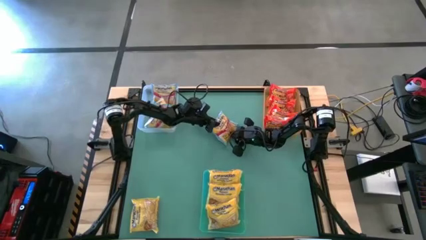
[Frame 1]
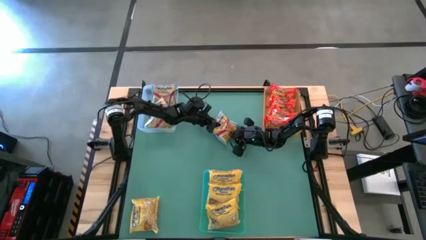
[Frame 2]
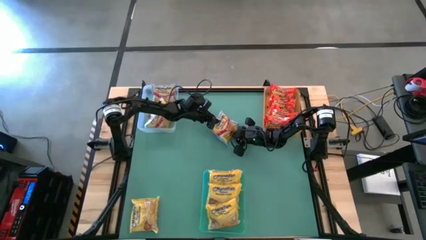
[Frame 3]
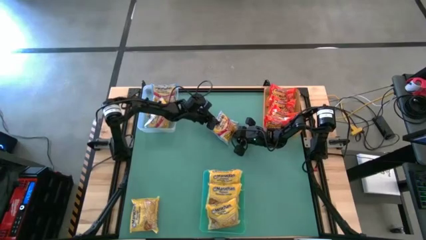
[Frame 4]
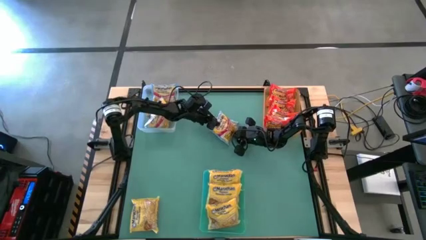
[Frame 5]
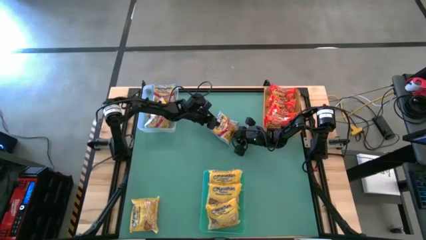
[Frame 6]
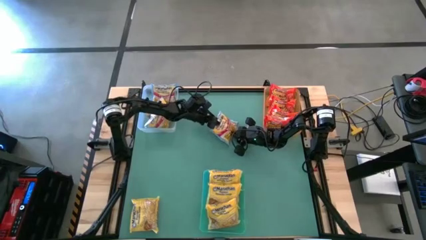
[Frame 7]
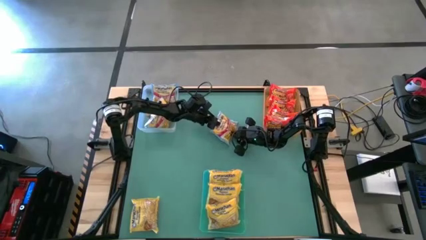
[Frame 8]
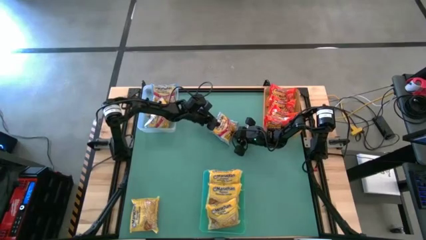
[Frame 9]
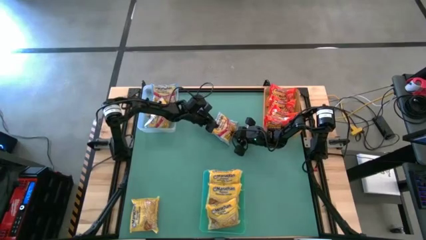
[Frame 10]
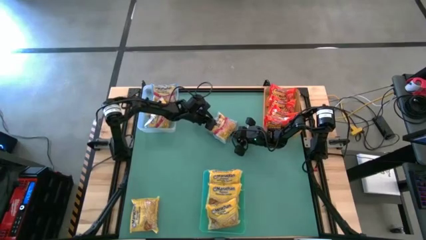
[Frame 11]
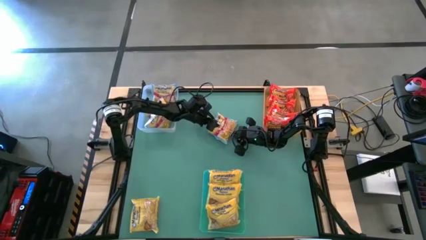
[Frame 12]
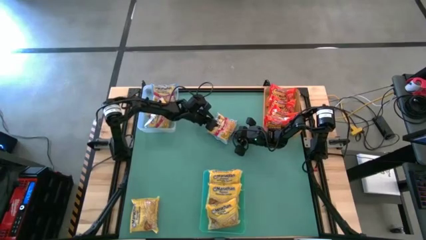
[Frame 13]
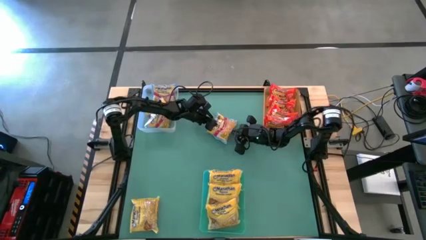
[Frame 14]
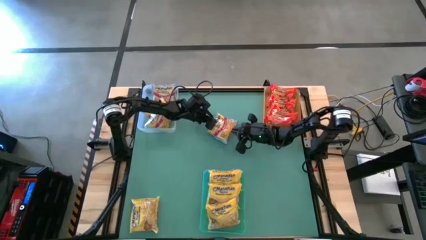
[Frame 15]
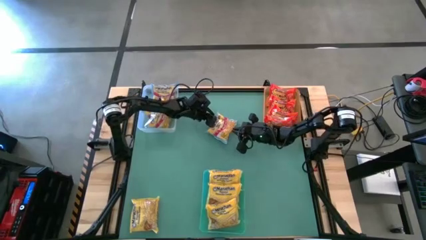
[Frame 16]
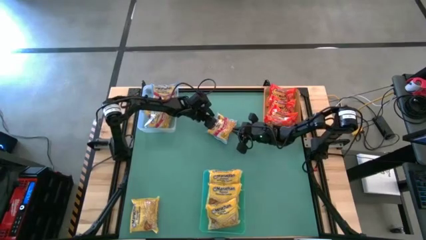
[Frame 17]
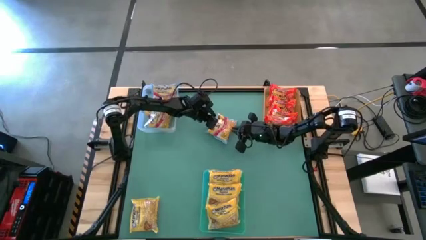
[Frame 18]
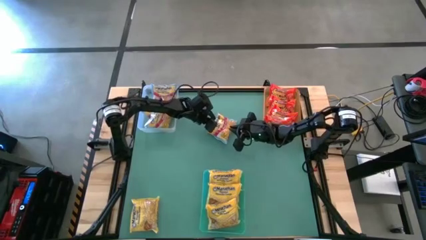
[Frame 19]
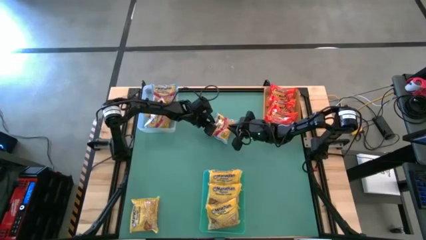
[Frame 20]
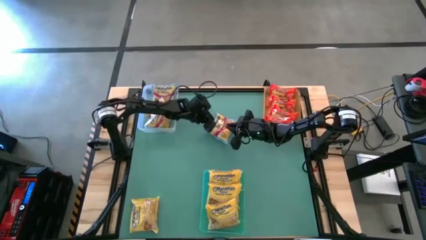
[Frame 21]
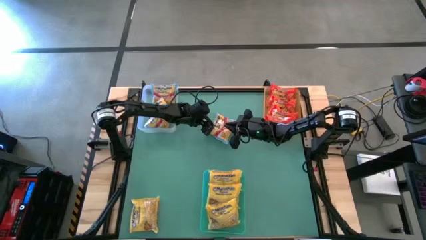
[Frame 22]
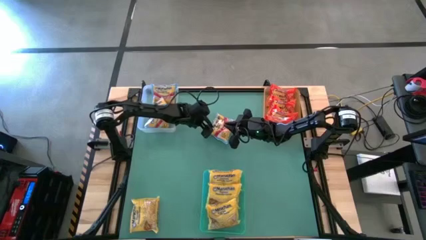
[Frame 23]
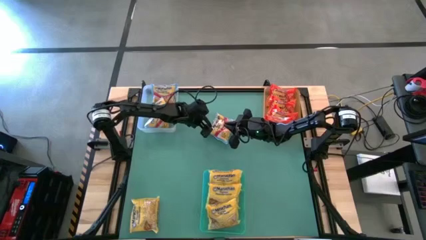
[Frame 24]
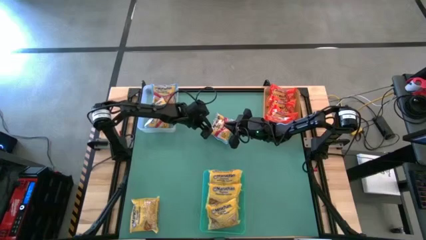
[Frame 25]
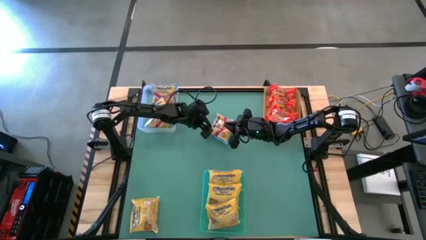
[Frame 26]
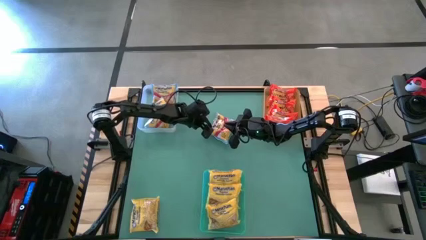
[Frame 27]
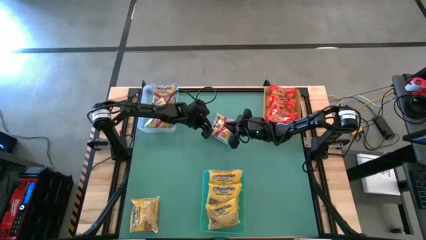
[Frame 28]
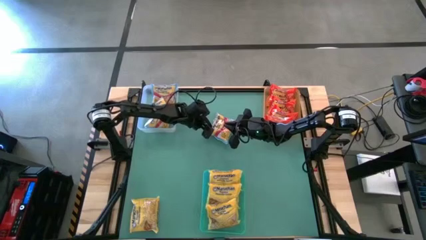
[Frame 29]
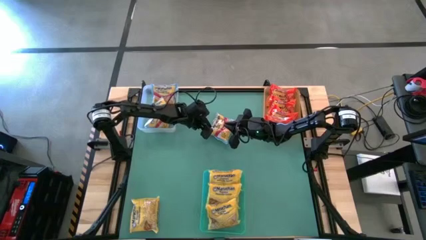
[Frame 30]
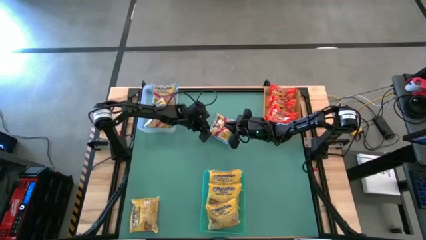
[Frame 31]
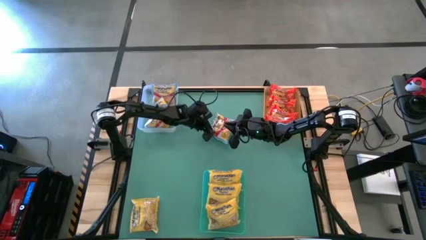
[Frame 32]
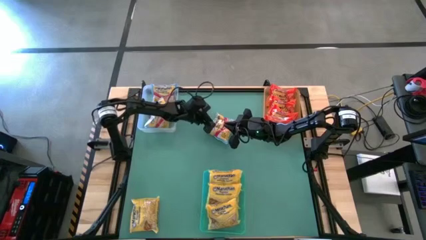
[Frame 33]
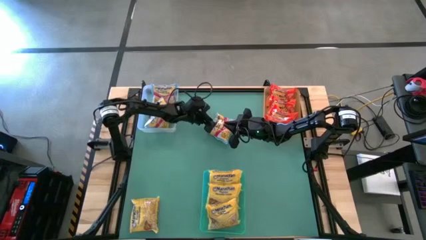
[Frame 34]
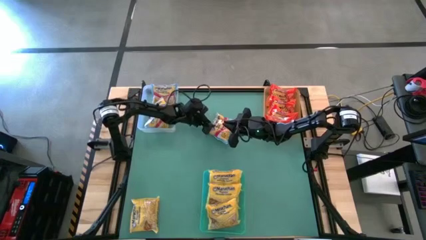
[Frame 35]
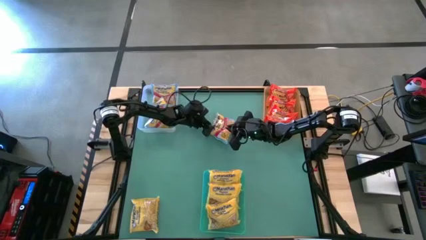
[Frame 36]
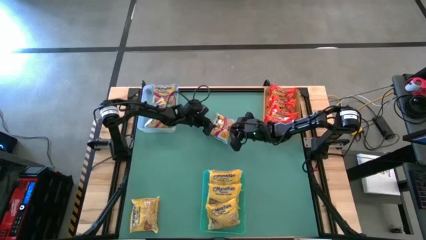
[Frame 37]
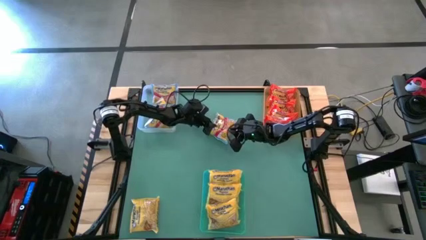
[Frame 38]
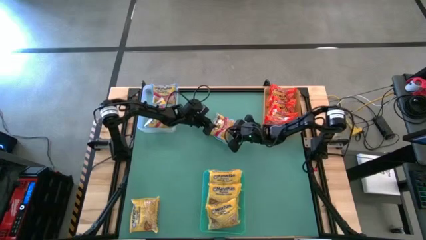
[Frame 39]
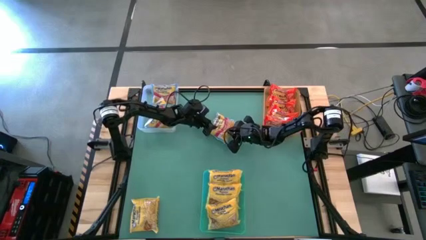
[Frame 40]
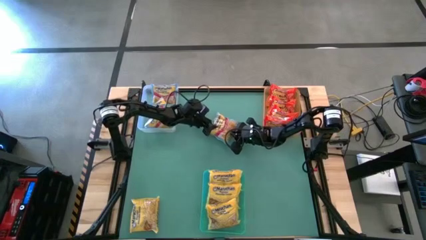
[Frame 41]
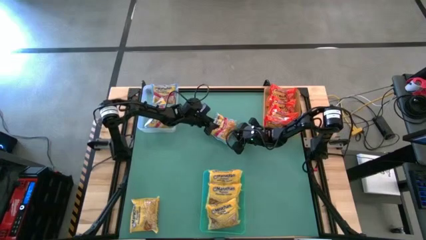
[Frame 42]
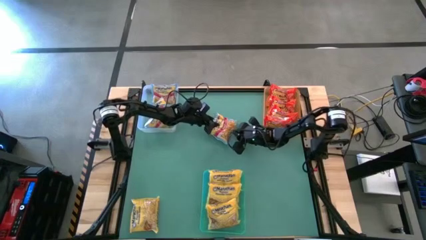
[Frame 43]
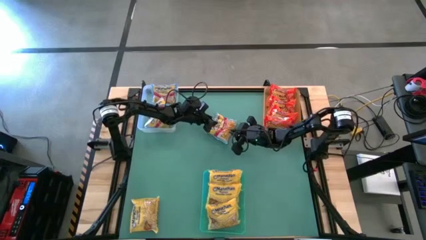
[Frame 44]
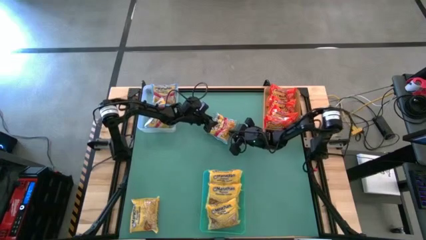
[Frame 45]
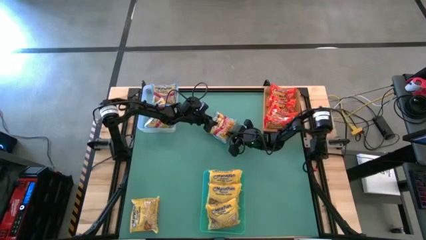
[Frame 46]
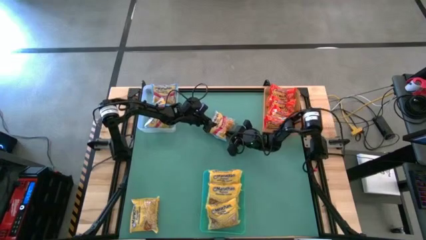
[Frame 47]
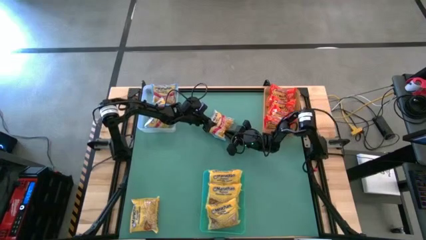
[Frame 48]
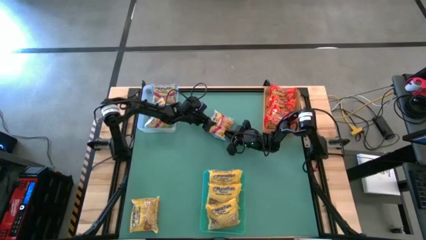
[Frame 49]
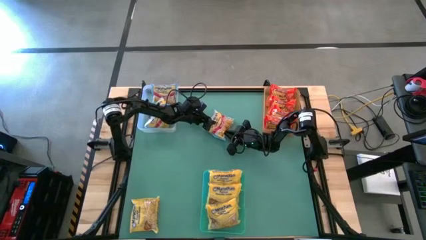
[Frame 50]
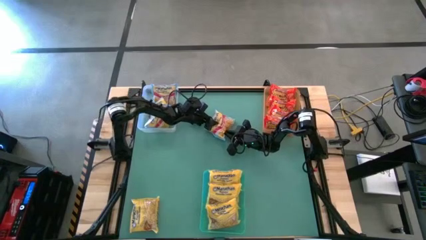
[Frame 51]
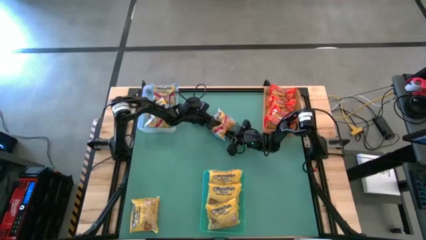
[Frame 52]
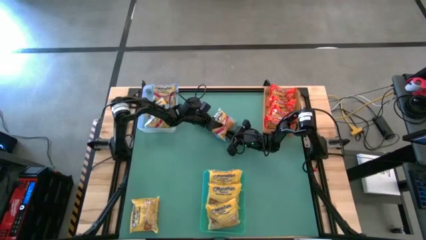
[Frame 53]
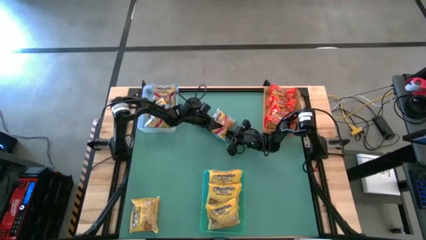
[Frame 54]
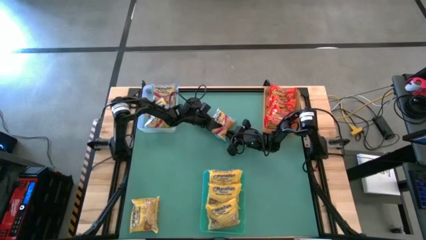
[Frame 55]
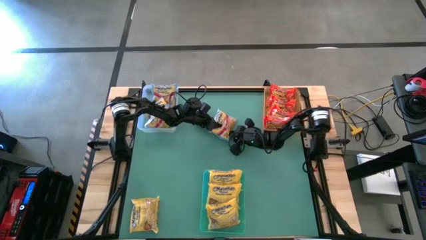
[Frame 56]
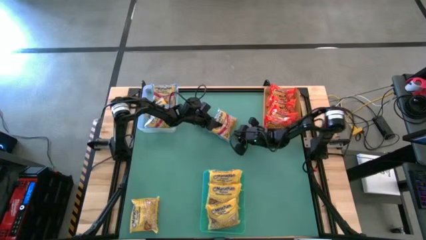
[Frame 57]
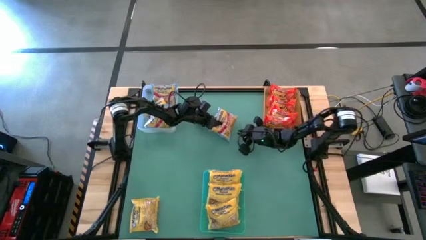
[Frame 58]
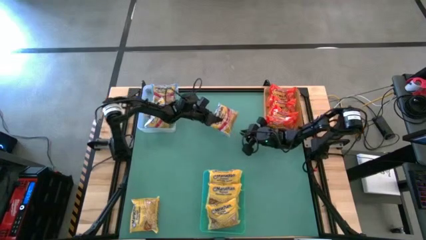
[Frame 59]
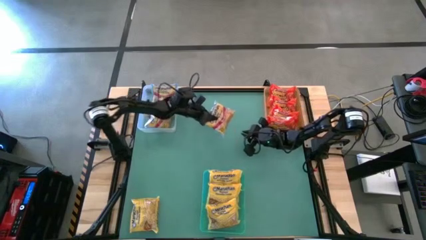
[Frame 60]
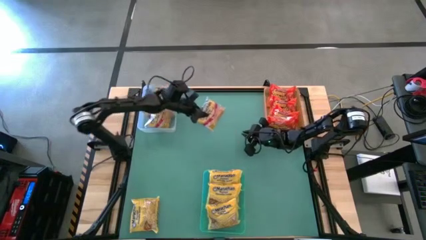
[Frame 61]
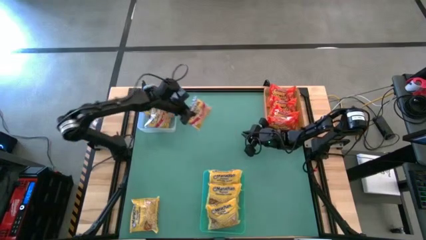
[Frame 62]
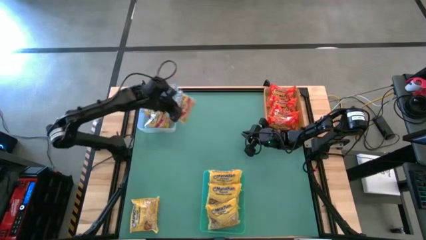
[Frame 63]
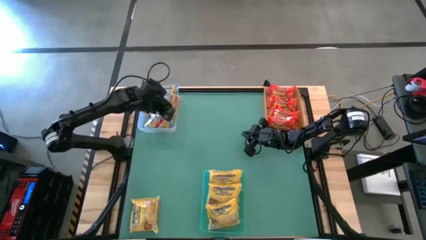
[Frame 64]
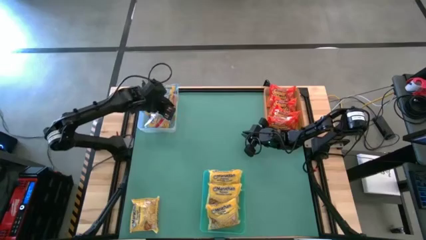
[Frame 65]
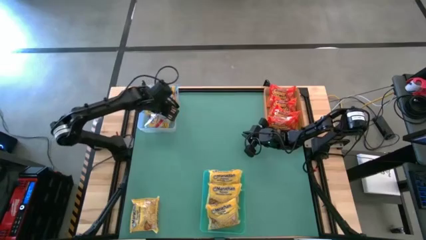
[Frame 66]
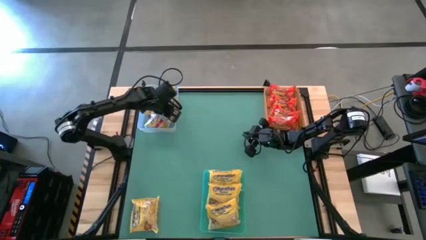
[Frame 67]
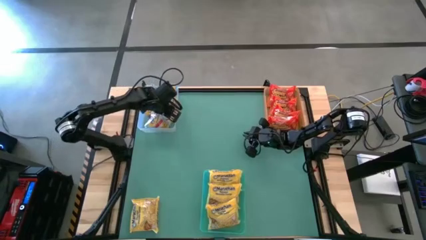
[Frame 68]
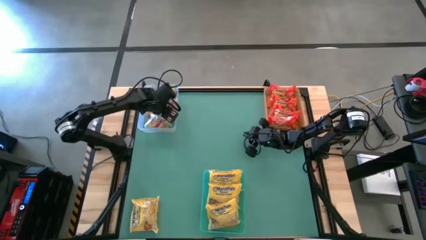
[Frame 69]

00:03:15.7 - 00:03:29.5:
Task: Sort Maruchan noodles
Put the blue noodle pack into the transparent bin
